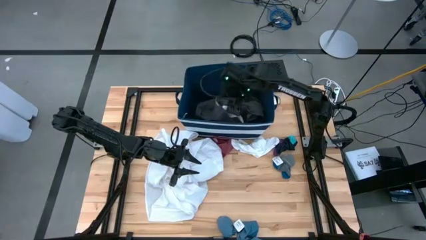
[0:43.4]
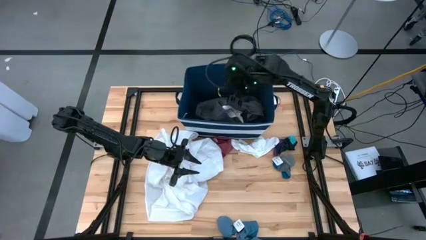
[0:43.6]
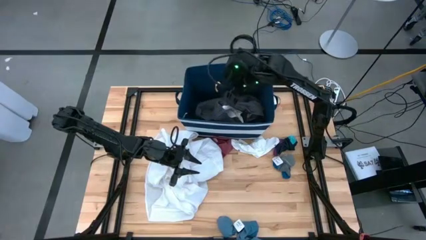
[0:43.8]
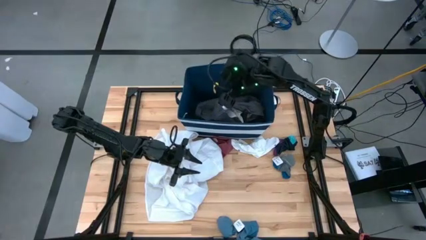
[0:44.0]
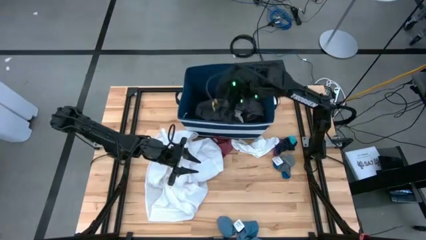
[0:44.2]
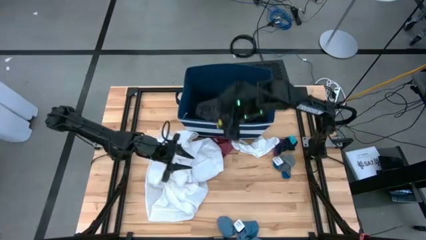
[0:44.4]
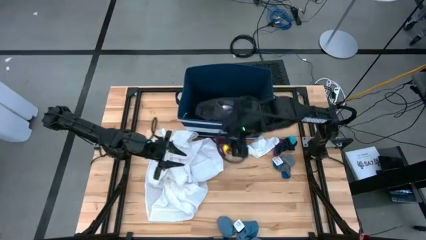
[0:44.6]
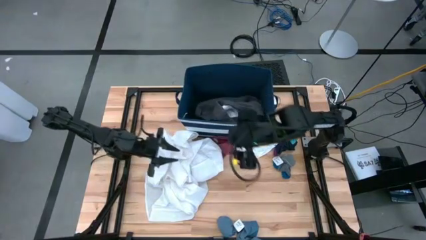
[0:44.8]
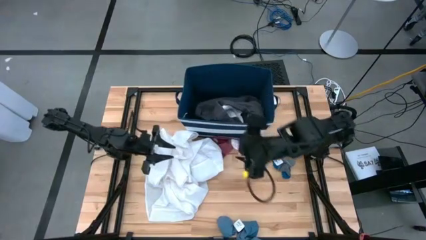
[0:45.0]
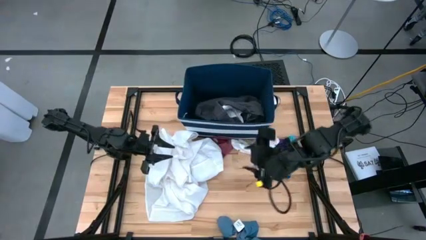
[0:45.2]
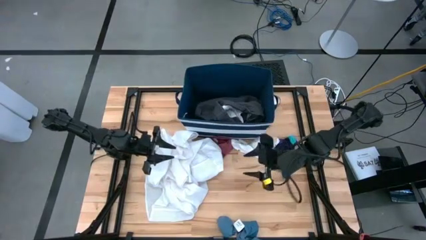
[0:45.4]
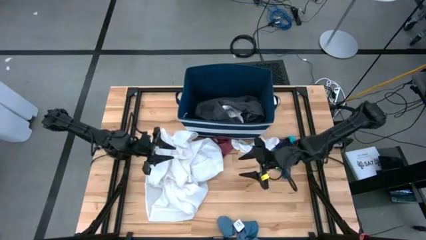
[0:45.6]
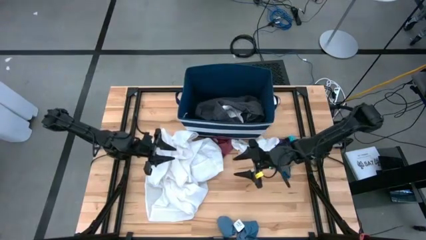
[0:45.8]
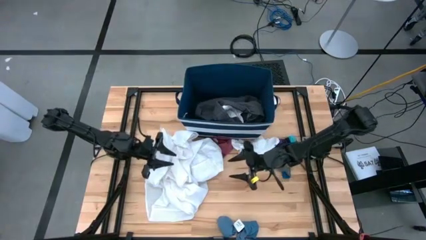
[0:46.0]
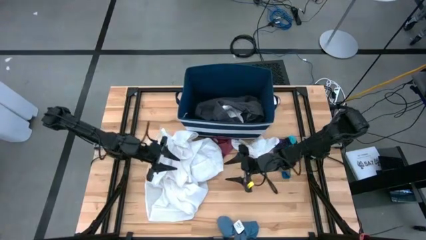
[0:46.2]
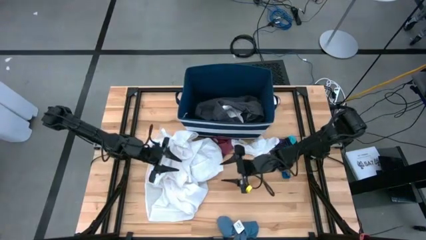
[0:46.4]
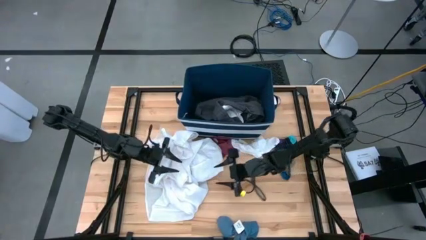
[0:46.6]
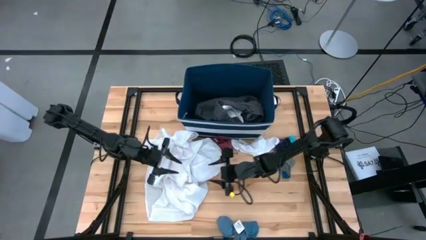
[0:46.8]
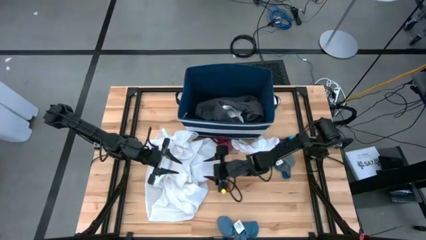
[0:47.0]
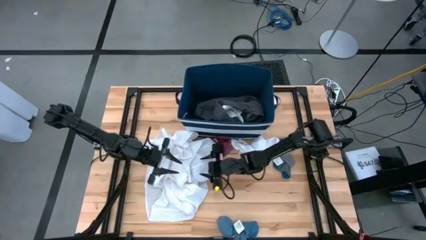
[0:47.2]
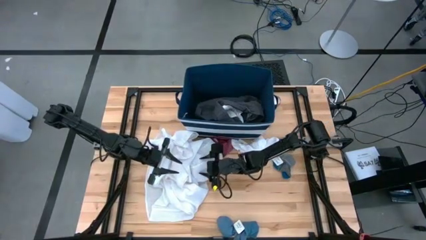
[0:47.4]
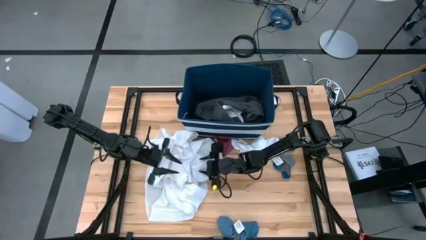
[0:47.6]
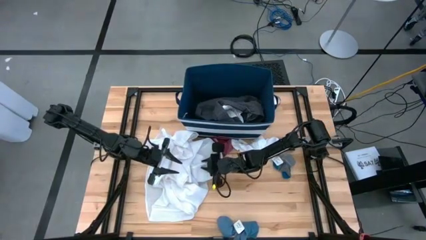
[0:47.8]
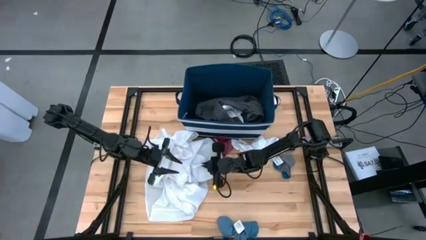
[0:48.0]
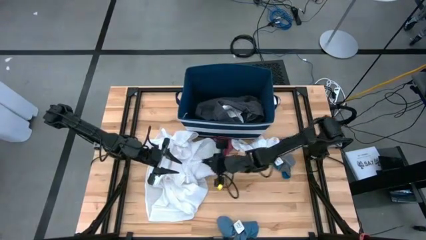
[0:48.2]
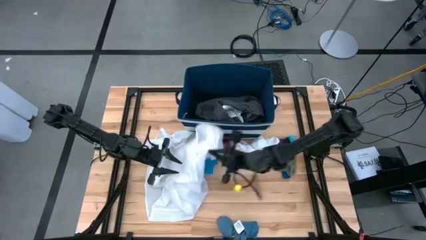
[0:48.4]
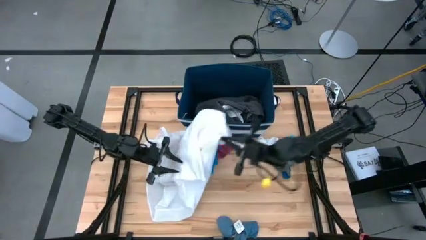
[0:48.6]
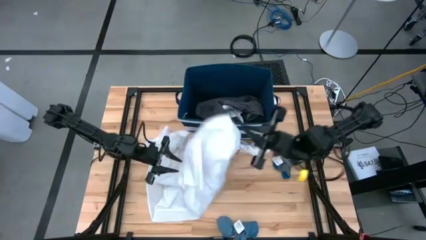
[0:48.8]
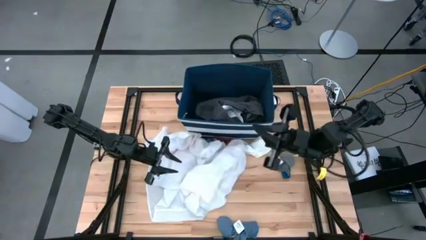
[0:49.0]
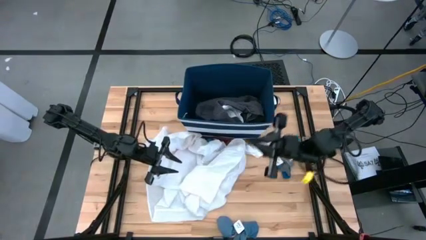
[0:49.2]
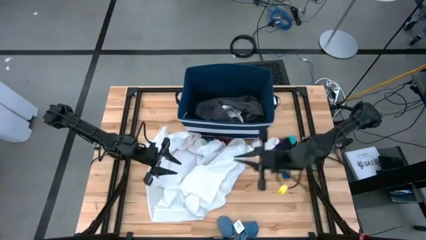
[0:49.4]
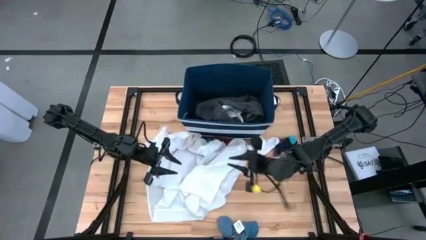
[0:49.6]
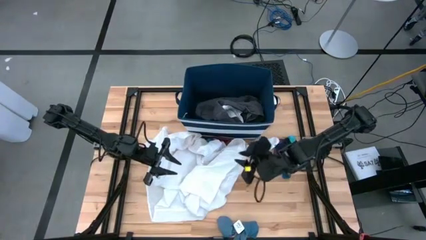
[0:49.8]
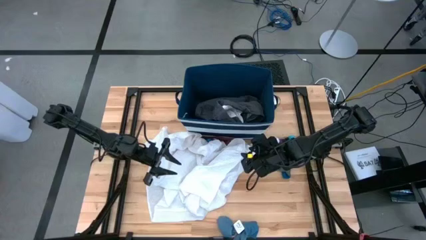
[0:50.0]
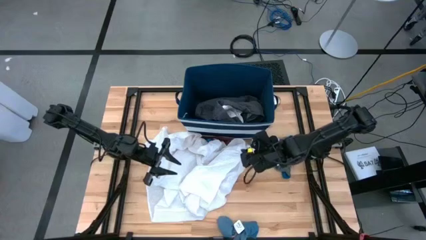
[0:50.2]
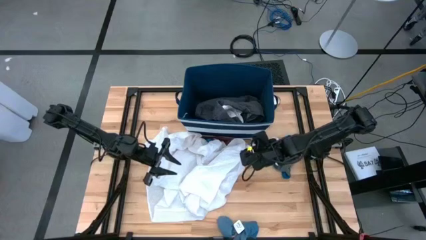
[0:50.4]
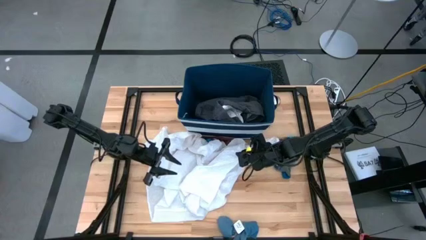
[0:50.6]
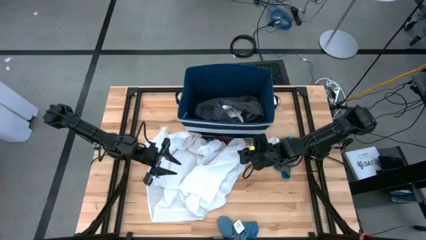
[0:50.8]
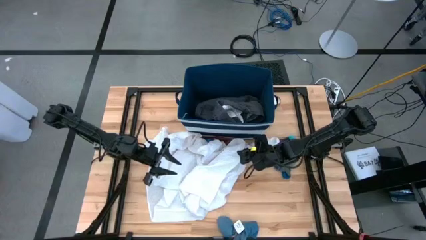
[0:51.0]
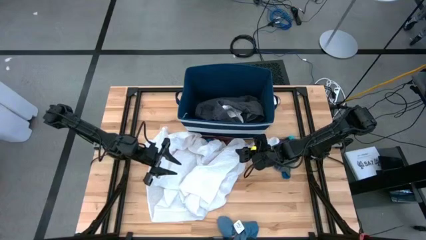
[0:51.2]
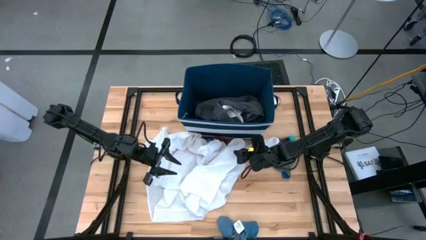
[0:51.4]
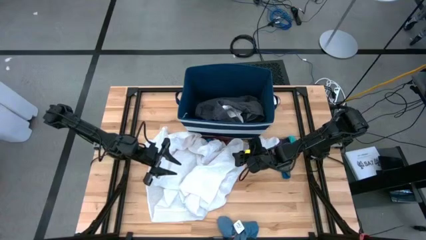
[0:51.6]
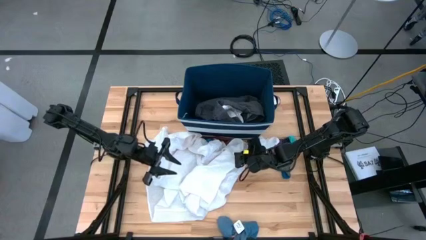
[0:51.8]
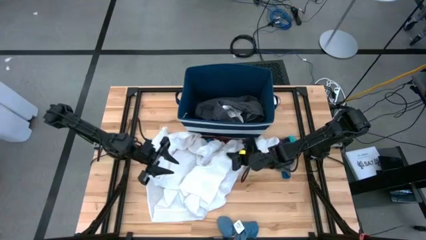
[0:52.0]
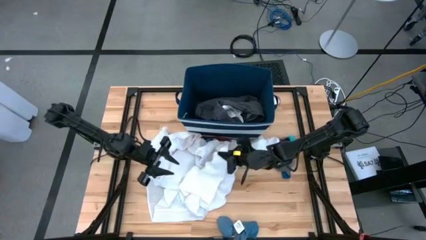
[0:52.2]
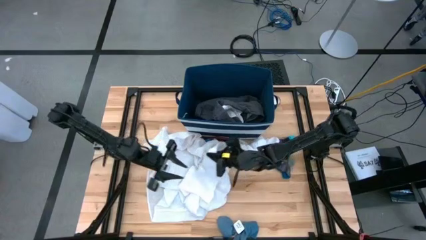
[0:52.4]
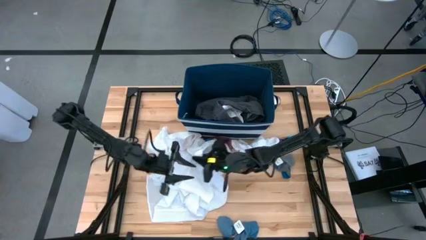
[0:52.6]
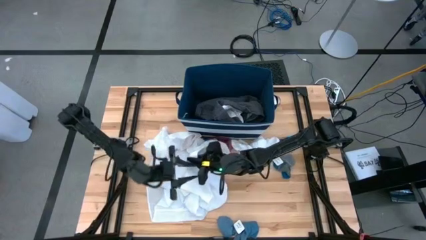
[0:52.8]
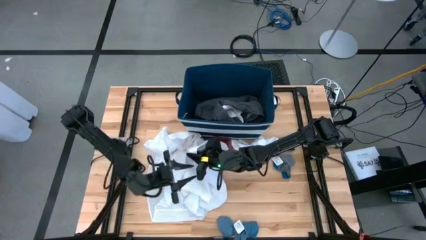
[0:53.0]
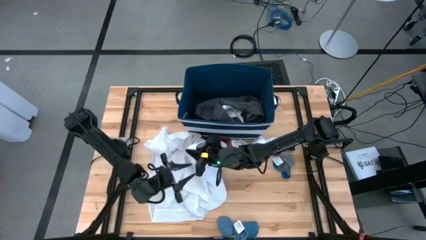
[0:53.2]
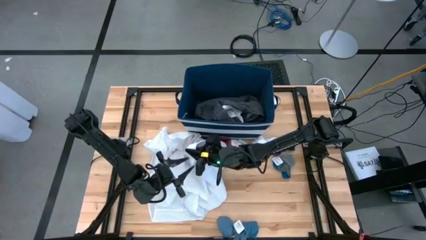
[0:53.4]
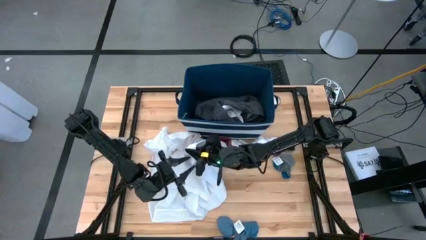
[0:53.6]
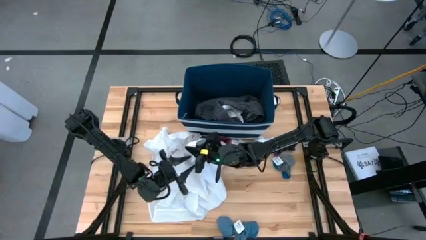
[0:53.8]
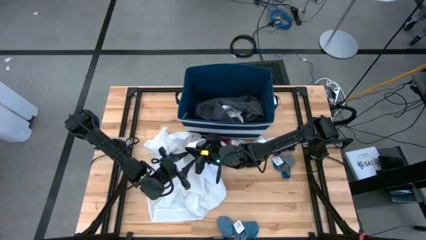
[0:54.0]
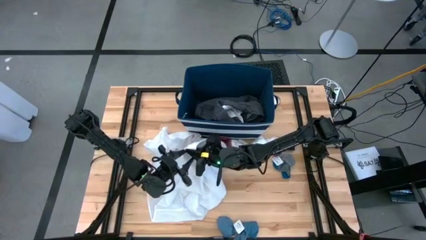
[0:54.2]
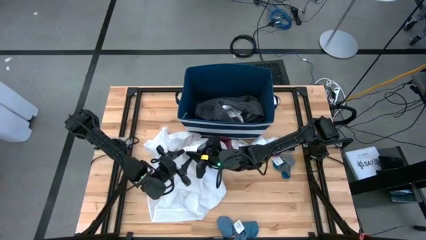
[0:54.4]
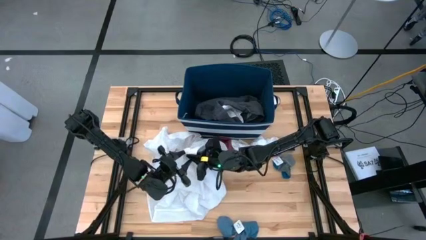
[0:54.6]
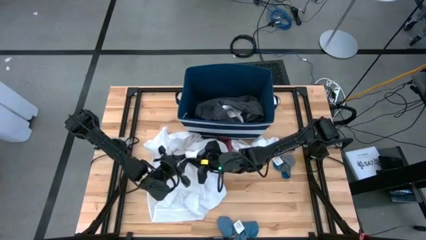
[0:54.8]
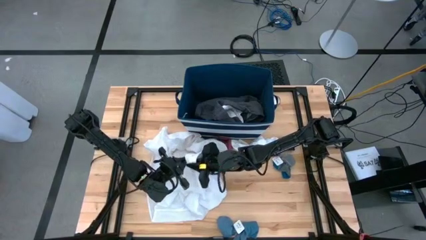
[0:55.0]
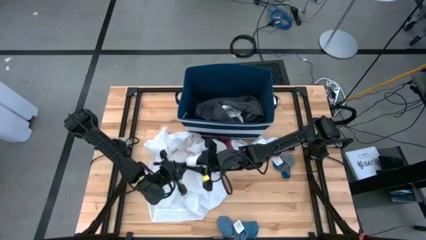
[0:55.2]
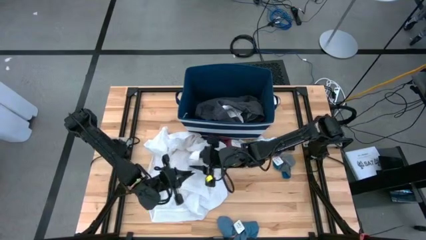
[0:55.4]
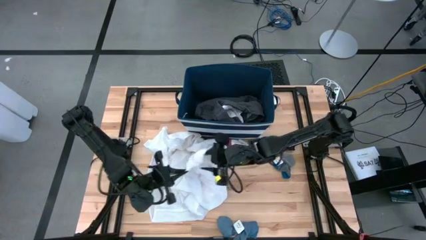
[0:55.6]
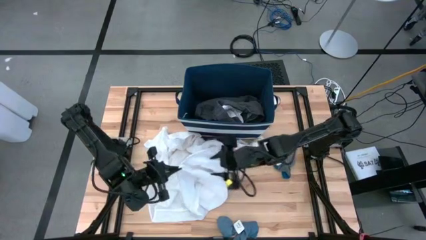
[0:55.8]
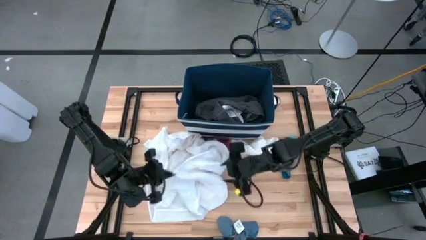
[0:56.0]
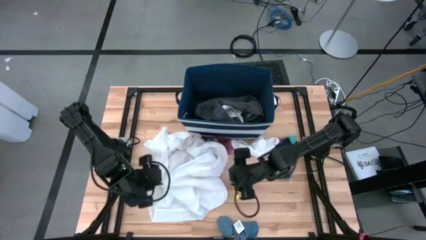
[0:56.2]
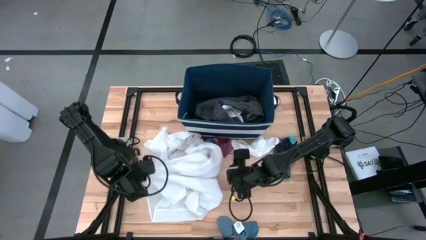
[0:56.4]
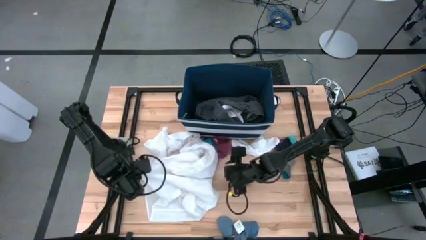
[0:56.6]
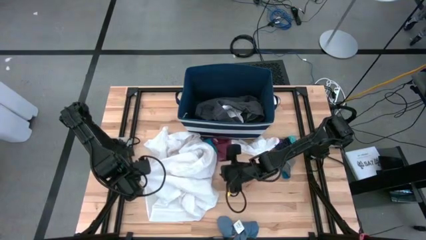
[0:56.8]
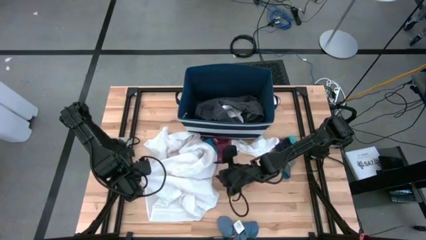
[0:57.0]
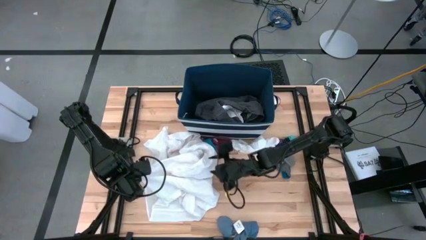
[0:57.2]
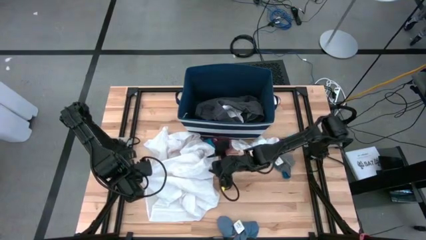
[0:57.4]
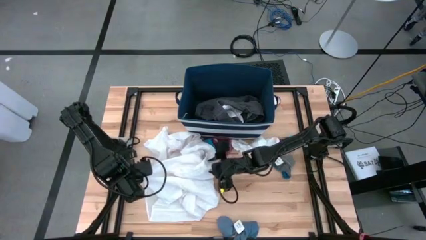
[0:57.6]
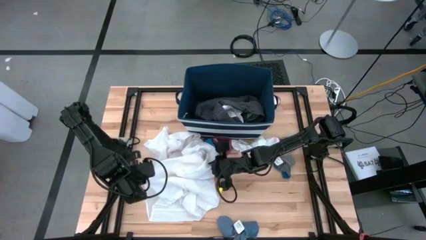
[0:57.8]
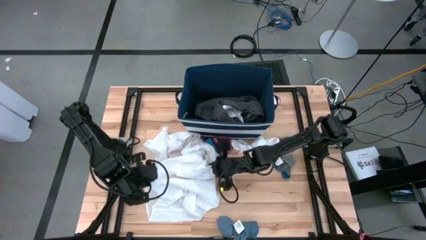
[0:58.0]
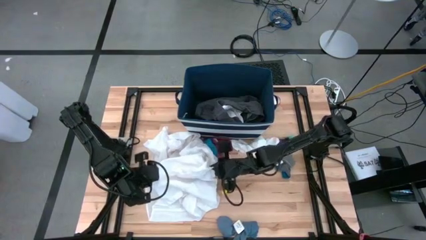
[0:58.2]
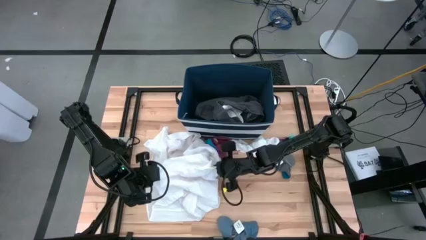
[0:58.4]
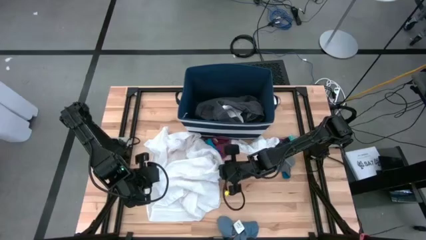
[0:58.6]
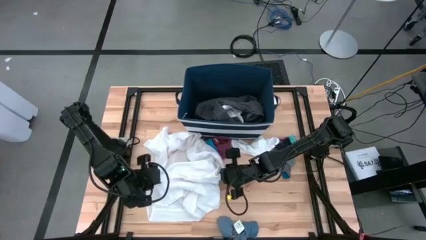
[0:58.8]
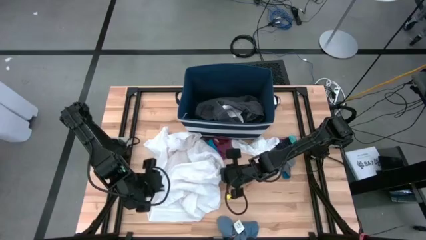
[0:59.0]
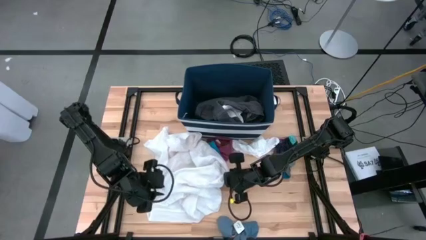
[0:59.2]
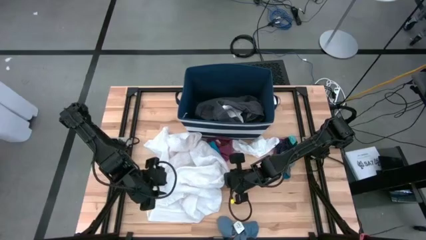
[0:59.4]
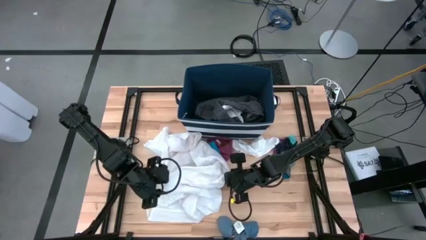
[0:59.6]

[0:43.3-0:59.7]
Task: Sort clothes
Put the white shirt into the blue laundry organizer
